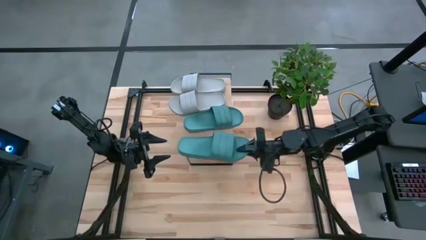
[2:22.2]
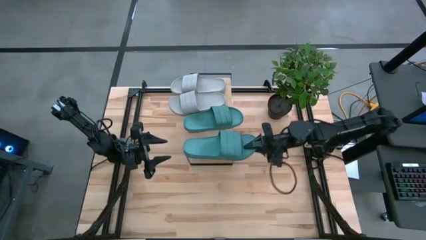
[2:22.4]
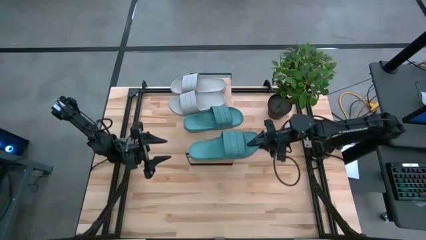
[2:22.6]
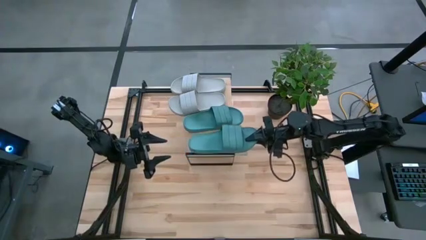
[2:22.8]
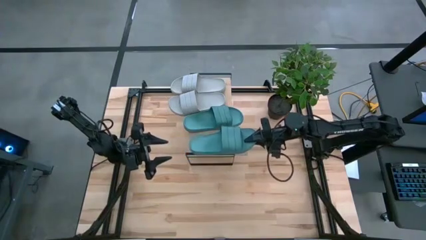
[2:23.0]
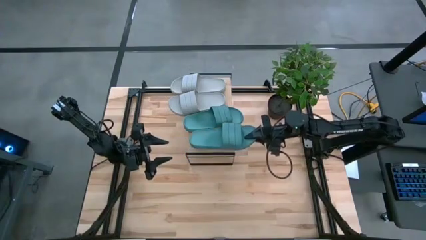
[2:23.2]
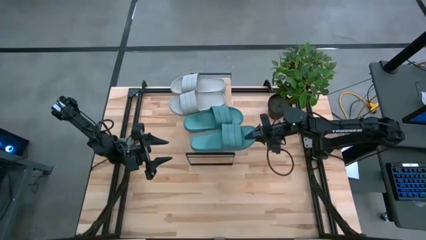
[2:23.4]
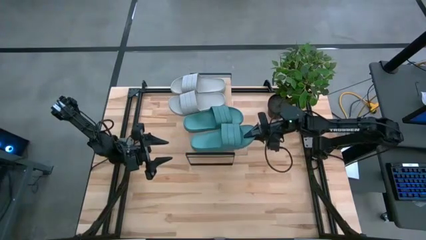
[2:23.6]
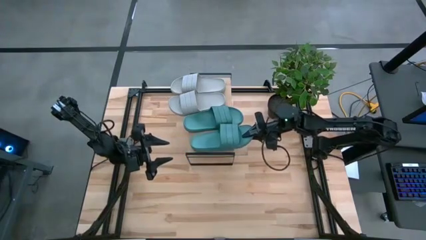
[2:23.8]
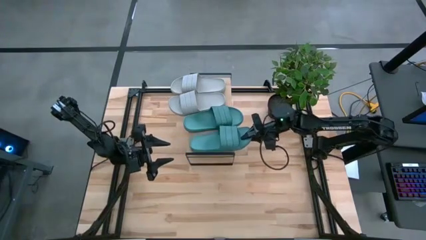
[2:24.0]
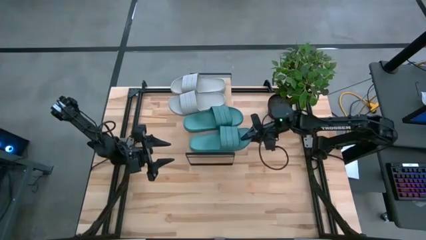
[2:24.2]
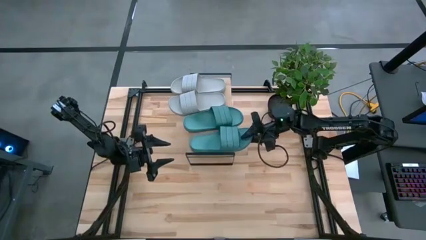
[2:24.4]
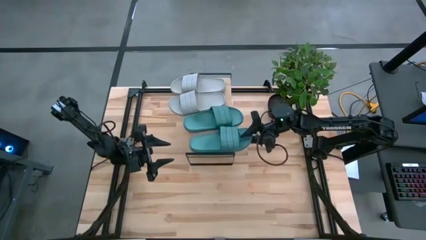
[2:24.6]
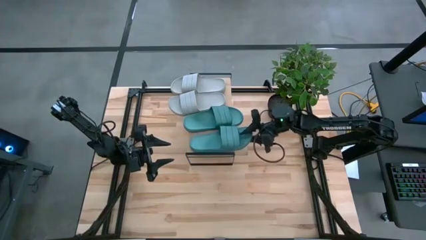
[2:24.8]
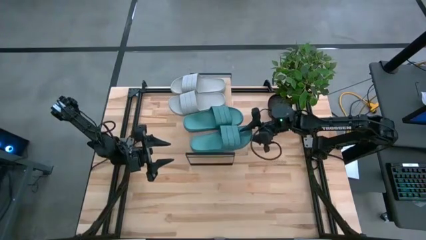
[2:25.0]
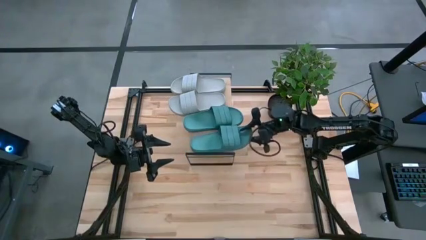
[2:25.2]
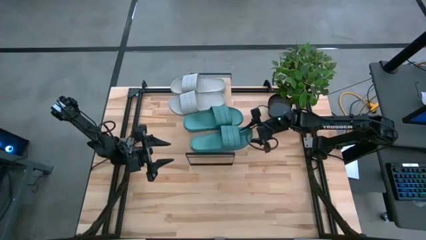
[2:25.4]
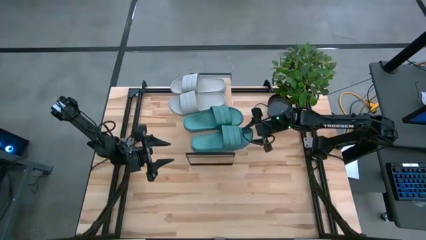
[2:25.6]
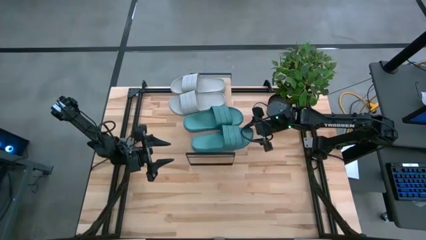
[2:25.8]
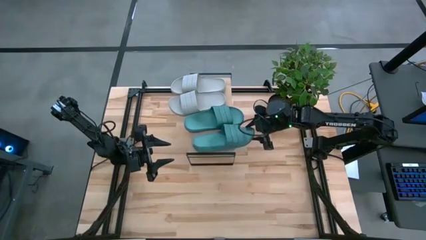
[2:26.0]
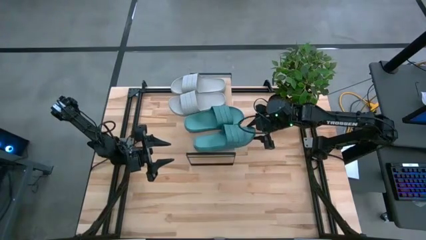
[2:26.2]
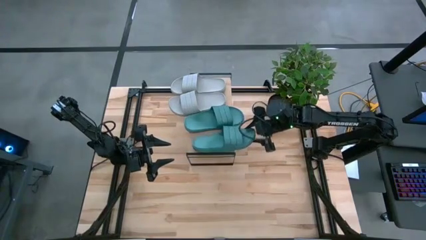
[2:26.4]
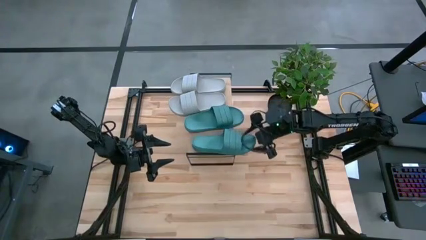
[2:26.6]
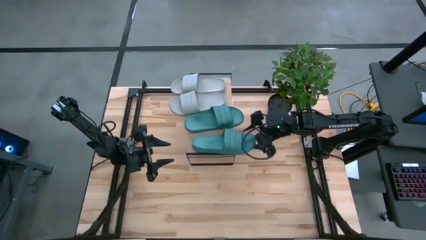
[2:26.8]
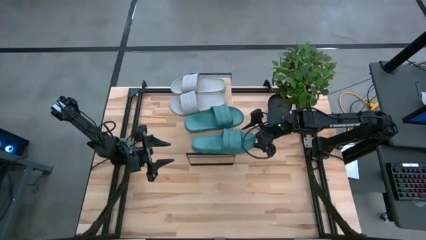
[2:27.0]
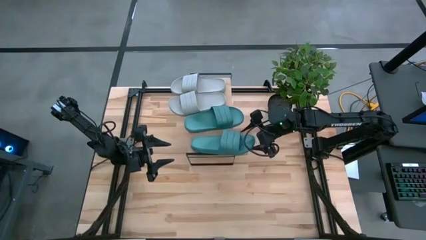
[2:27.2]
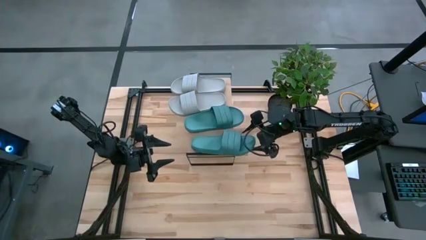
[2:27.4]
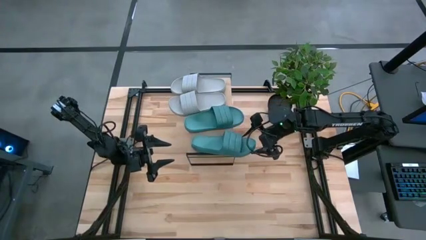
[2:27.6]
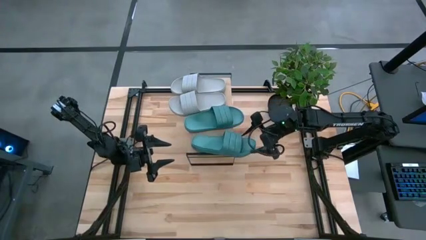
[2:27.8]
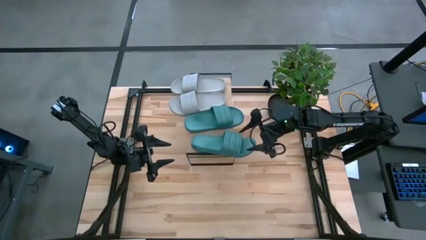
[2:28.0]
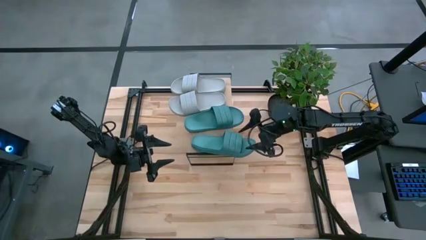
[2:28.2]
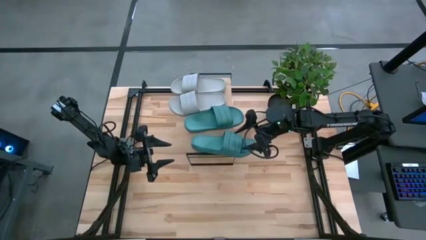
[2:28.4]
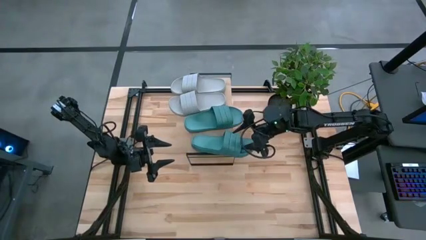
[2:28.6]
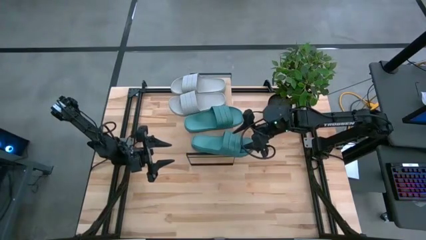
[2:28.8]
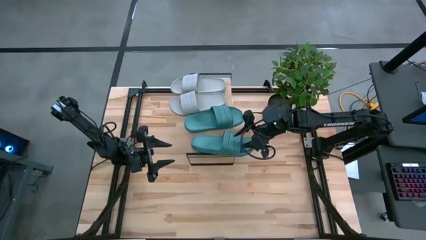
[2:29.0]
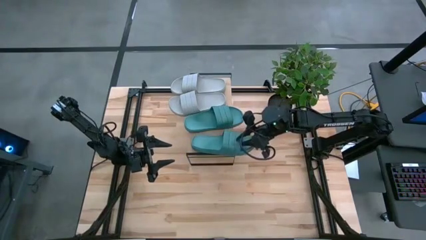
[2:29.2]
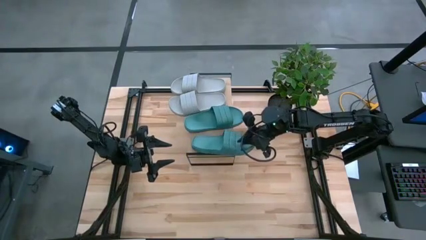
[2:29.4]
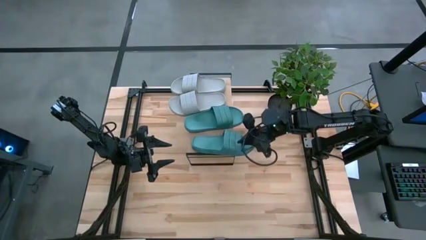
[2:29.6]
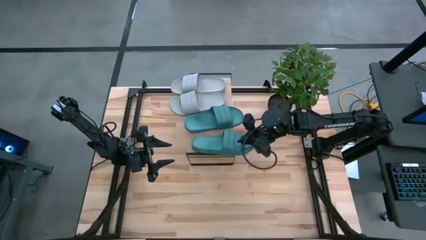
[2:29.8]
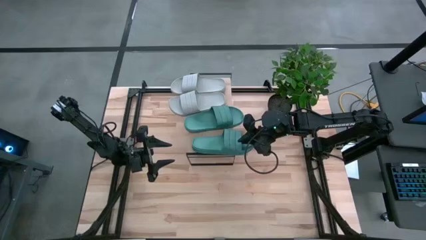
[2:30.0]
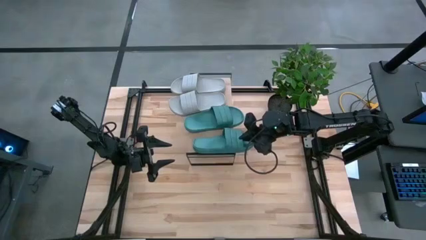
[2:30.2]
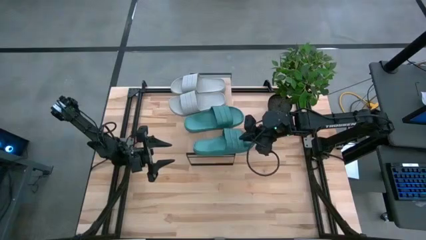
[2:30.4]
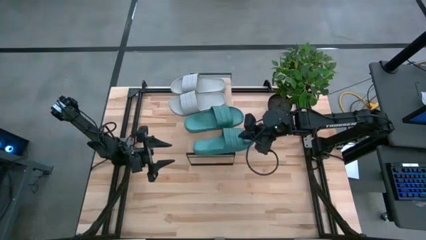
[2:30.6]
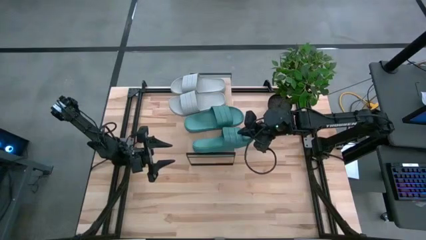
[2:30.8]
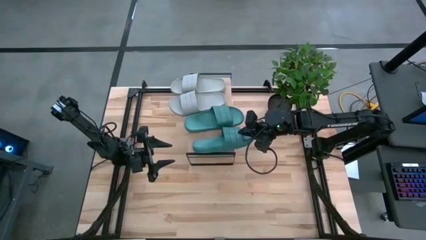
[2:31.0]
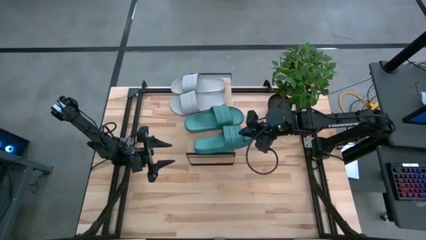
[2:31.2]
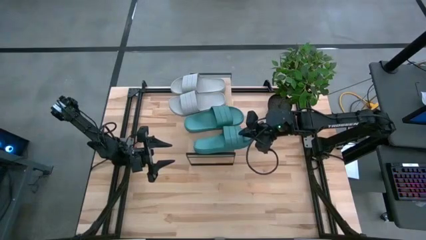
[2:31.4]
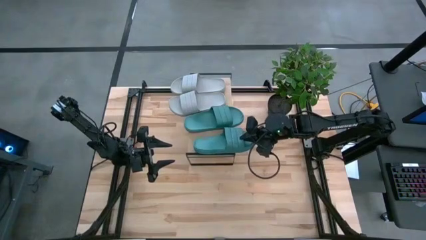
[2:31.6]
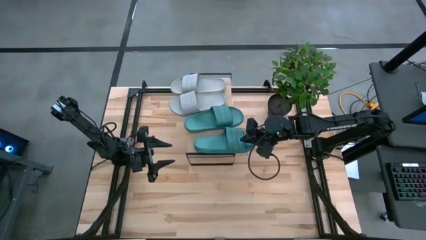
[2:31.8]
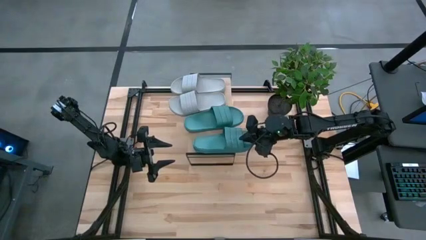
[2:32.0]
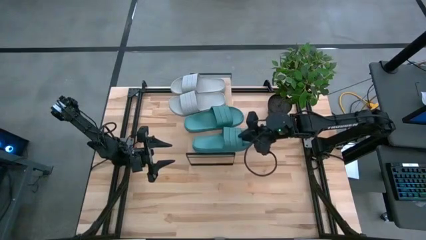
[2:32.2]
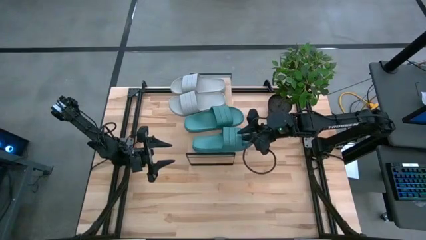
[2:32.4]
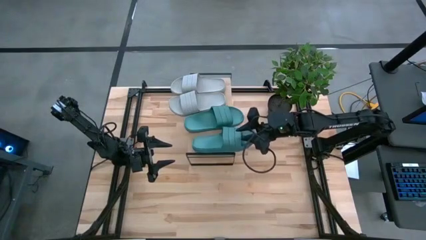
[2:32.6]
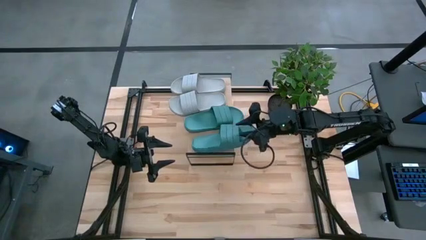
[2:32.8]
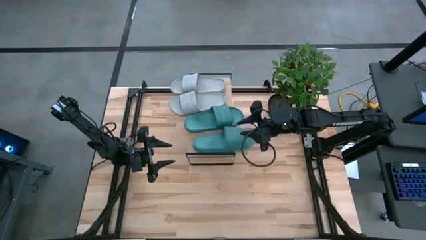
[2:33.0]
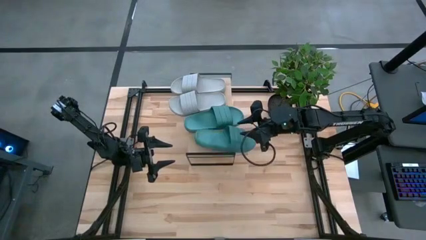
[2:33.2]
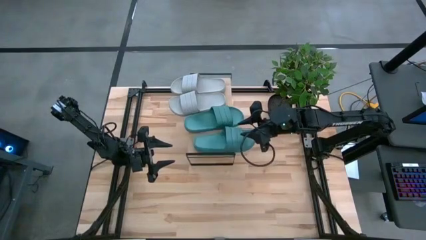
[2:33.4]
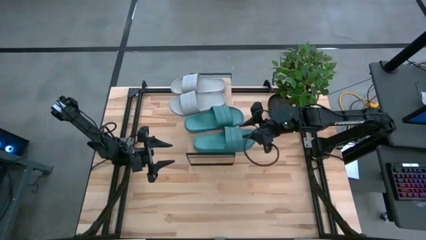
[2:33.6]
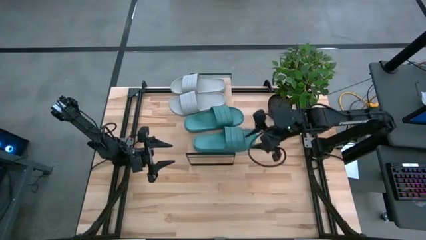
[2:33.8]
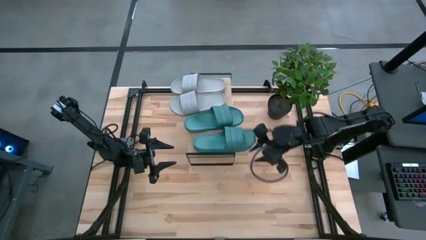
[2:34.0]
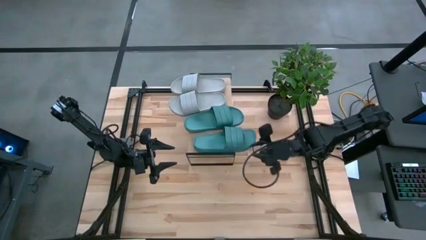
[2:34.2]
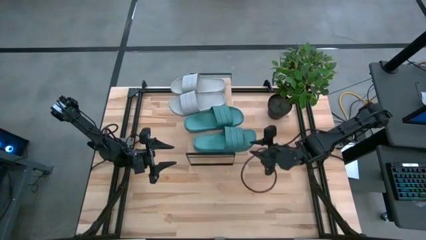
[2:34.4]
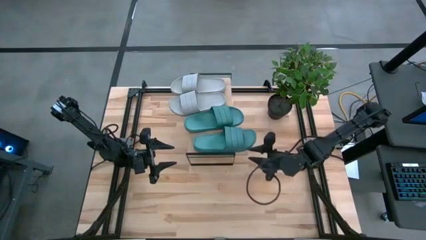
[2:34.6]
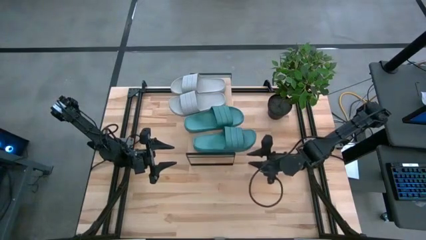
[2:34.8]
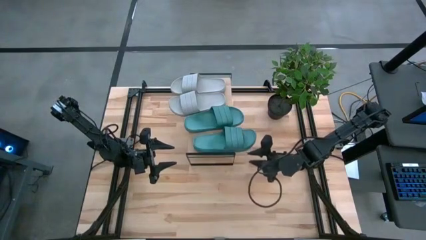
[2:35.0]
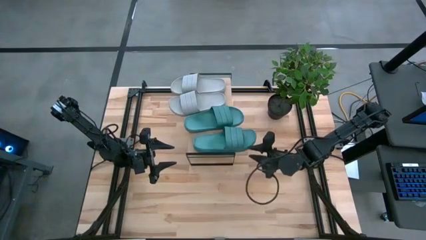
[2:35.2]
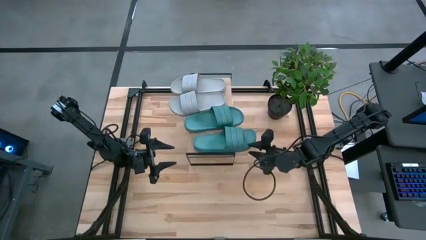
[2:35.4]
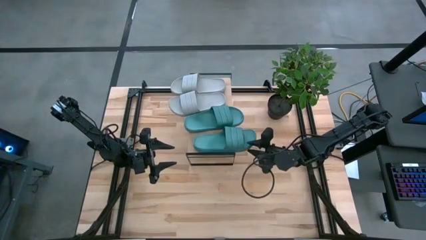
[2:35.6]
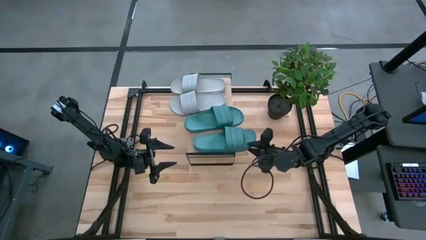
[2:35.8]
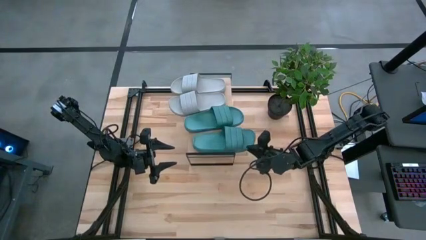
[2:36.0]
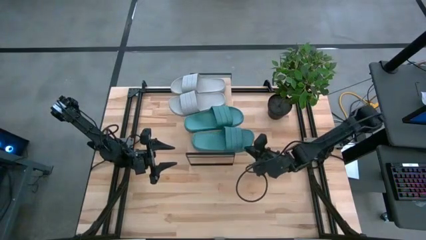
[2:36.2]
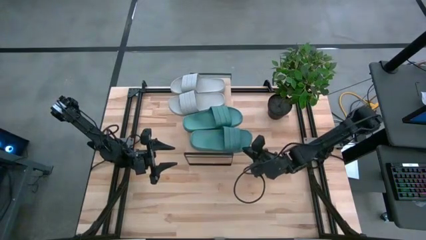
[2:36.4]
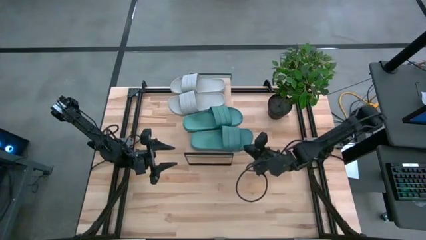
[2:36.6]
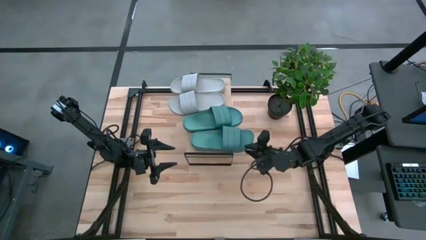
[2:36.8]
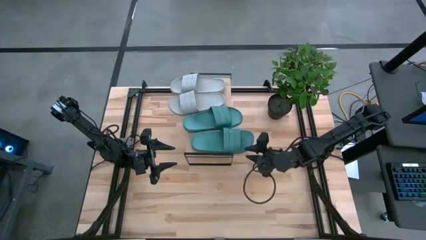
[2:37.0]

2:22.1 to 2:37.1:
Task: Pick and place slides into the shelf
Put the blue slide on the shelf

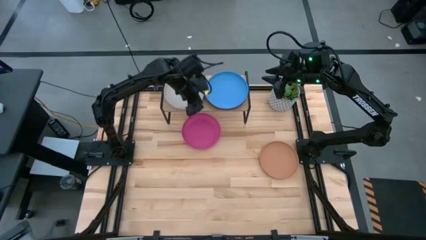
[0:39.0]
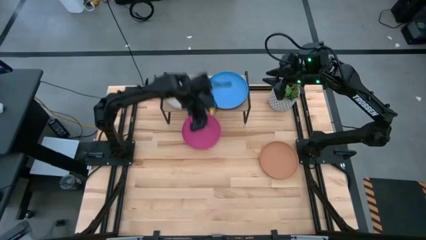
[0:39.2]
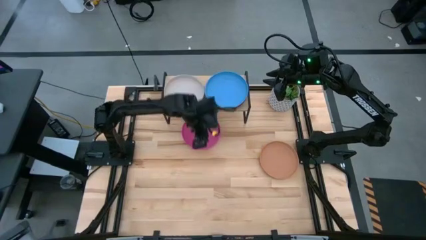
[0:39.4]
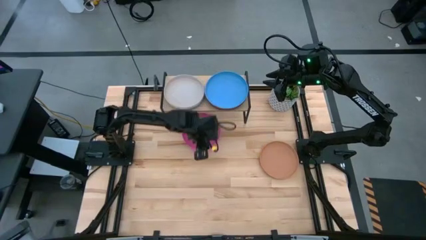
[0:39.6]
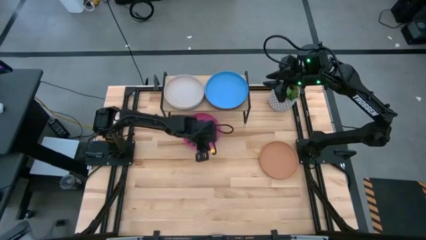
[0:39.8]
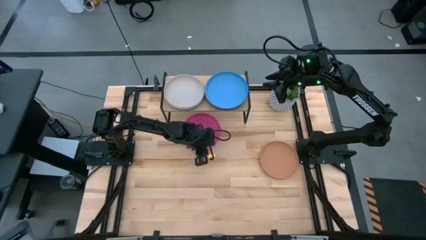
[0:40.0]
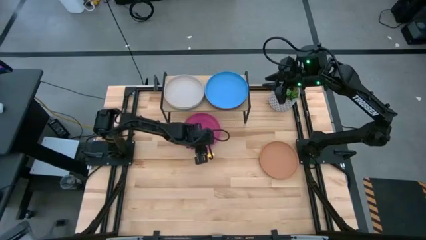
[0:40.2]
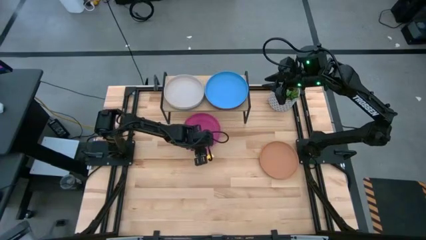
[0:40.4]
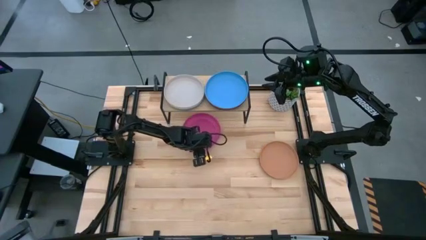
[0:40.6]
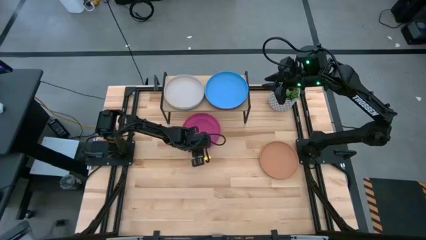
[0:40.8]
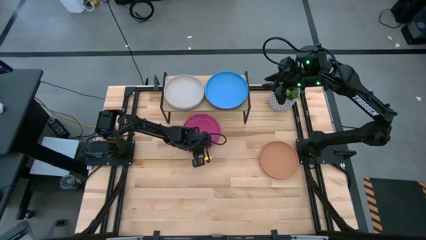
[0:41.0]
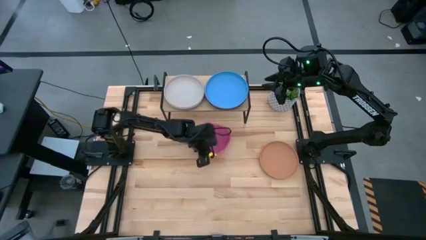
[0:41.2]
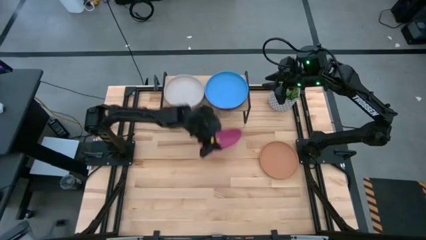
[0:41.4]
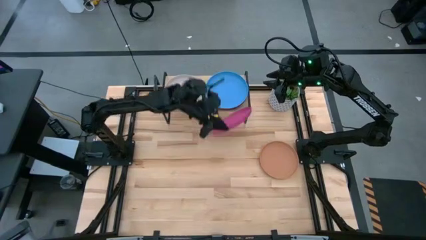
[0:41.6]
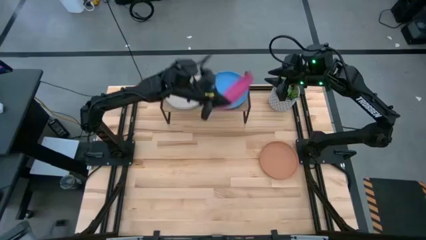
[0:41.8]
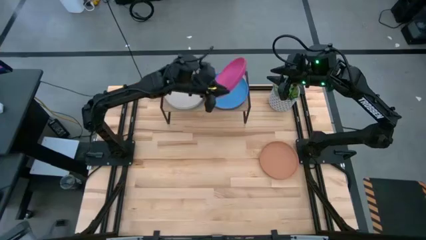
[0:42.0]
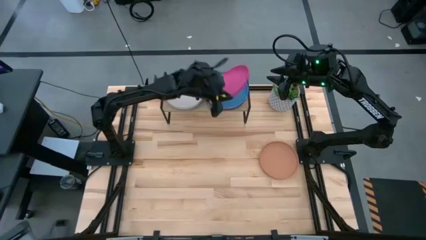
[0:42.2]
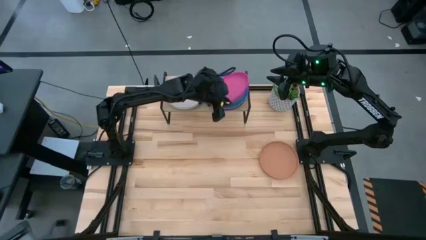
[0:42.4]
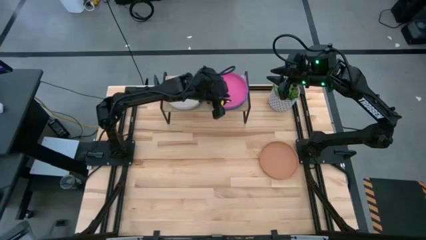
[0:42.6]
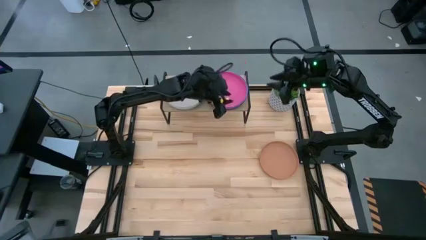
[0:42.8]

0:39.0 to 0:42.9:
Task: Place and stack plates onto a shelf
Stack the pink plate on the light blue plate on the shelf
